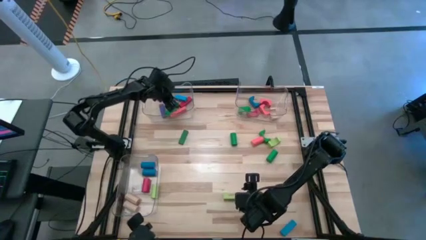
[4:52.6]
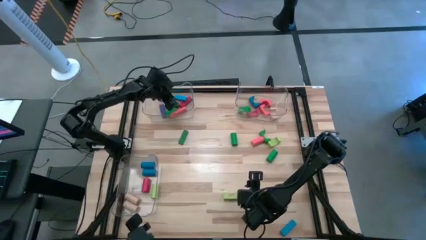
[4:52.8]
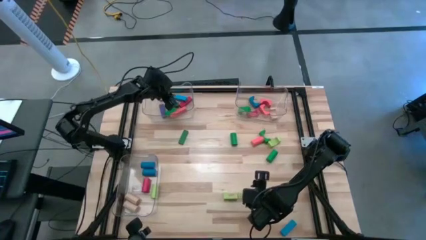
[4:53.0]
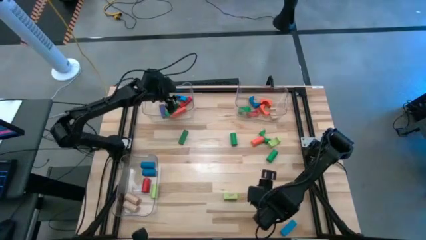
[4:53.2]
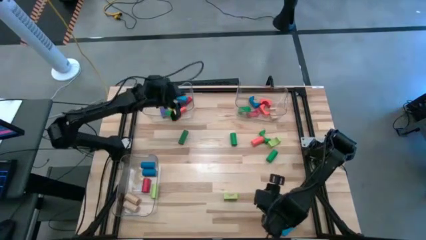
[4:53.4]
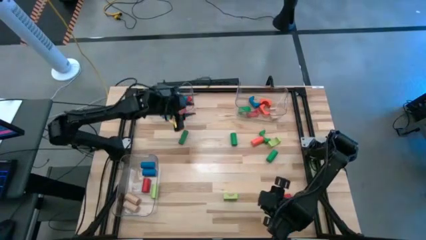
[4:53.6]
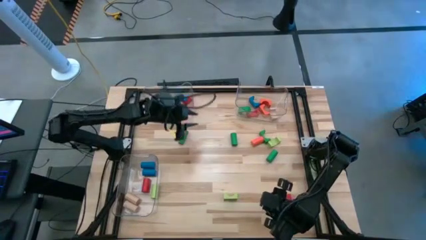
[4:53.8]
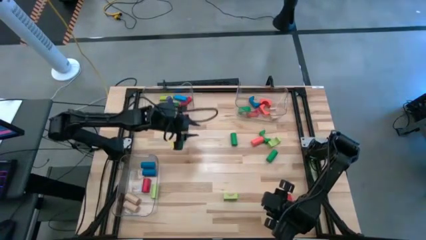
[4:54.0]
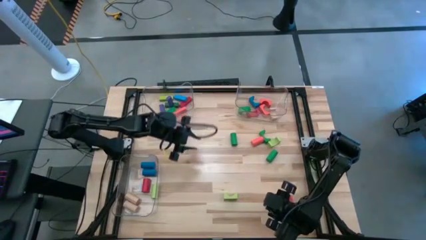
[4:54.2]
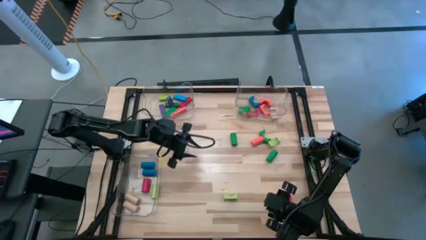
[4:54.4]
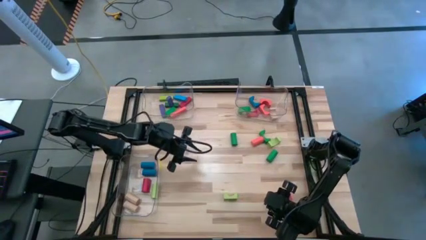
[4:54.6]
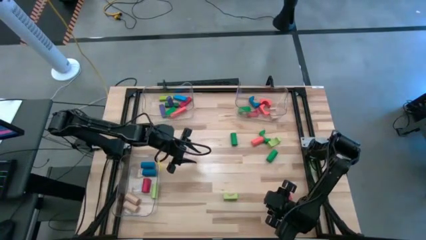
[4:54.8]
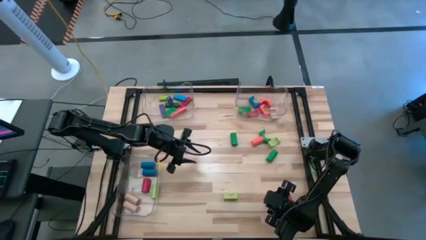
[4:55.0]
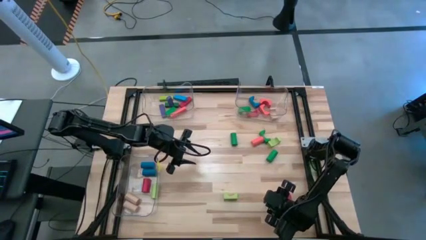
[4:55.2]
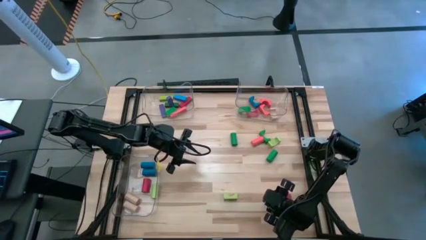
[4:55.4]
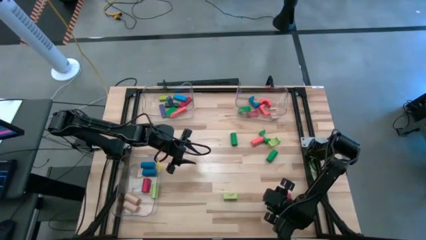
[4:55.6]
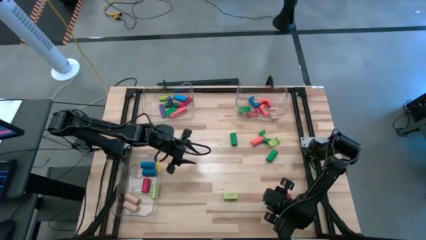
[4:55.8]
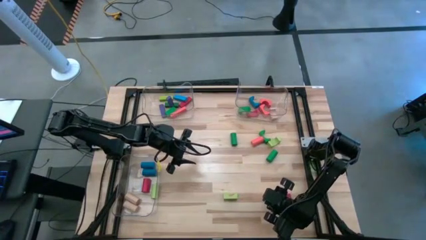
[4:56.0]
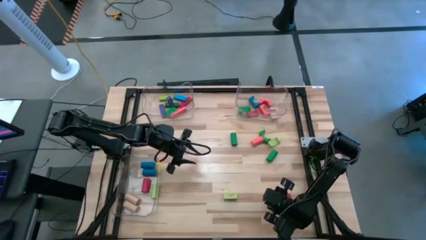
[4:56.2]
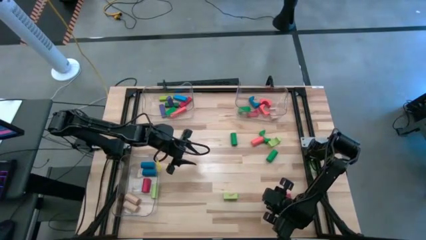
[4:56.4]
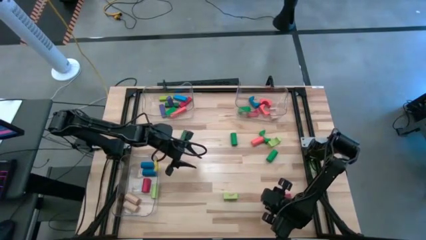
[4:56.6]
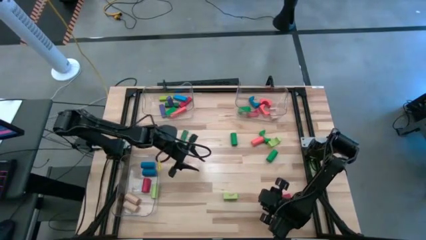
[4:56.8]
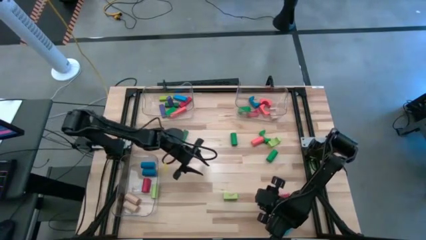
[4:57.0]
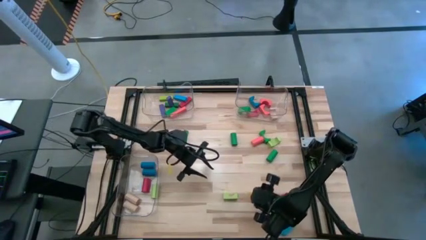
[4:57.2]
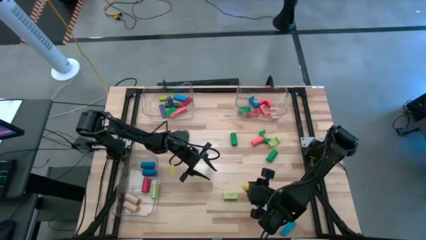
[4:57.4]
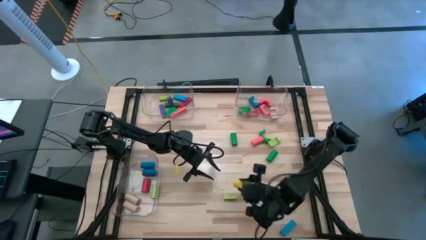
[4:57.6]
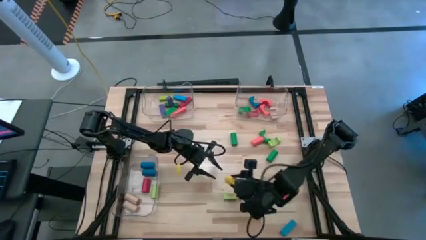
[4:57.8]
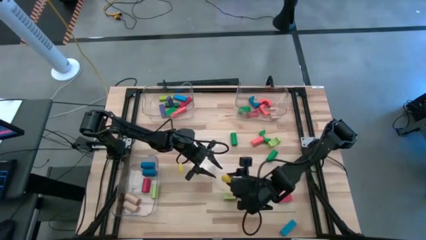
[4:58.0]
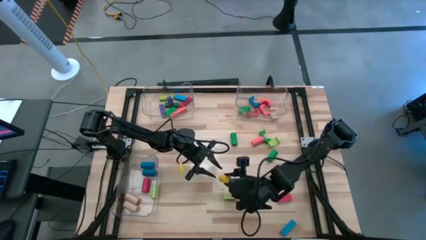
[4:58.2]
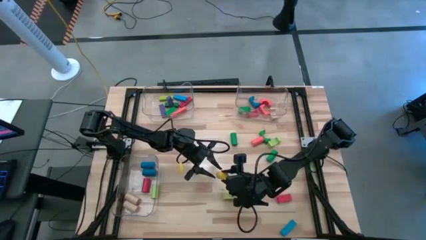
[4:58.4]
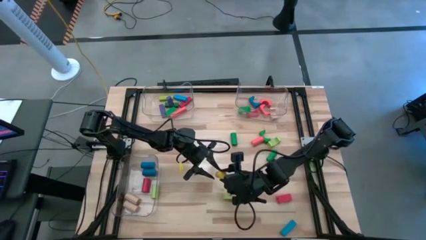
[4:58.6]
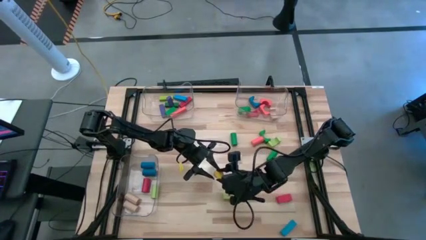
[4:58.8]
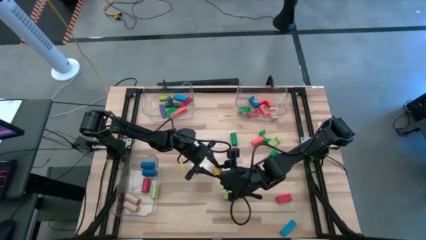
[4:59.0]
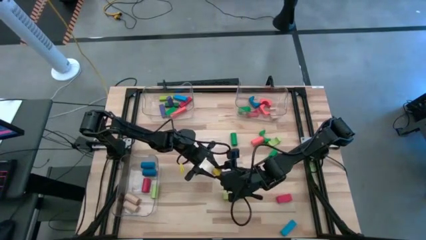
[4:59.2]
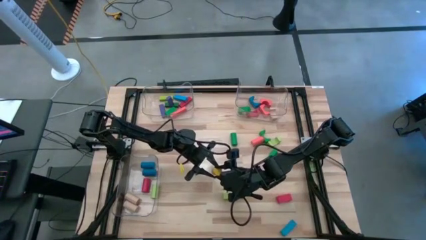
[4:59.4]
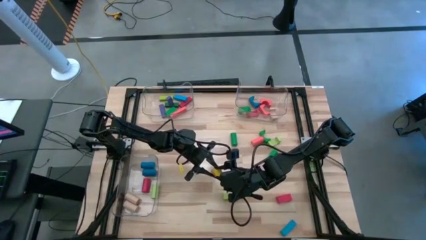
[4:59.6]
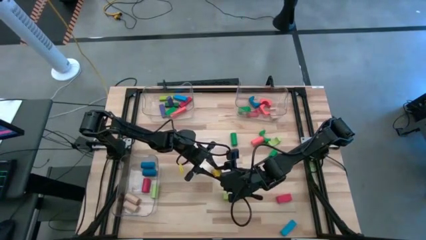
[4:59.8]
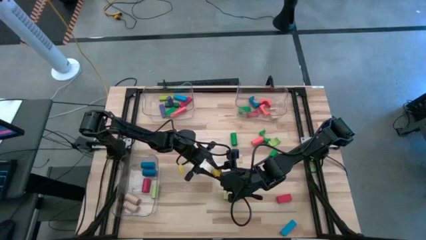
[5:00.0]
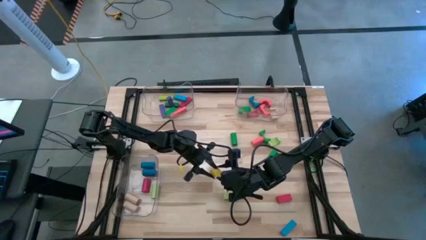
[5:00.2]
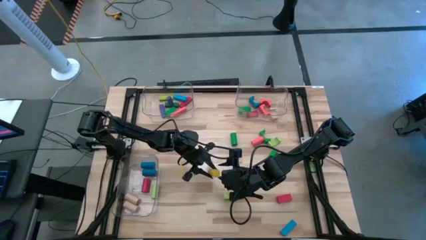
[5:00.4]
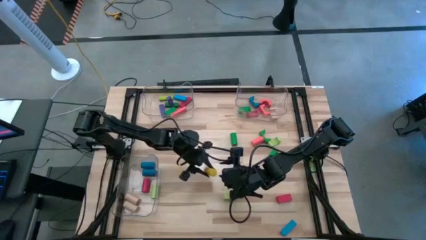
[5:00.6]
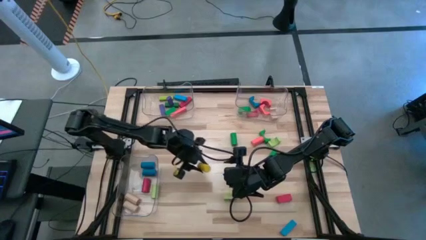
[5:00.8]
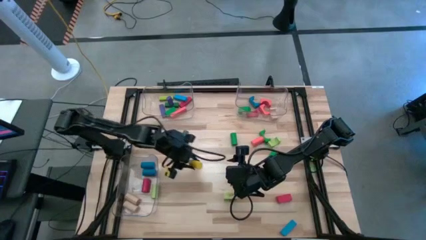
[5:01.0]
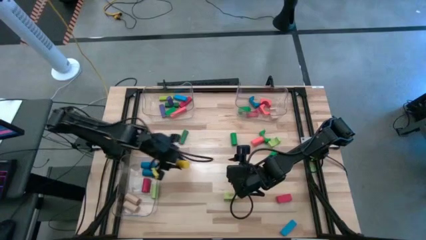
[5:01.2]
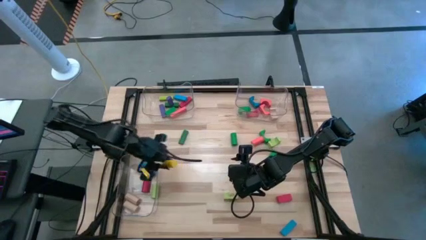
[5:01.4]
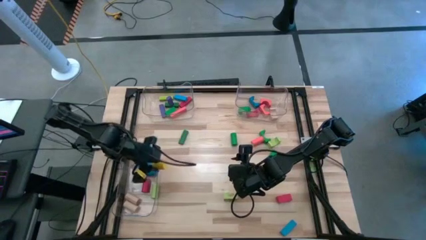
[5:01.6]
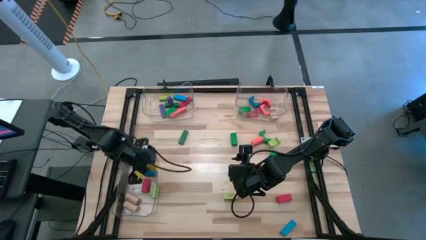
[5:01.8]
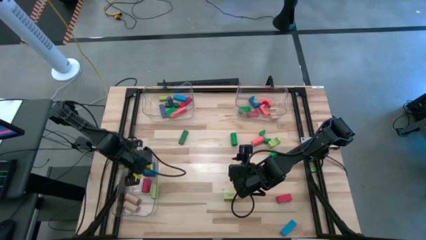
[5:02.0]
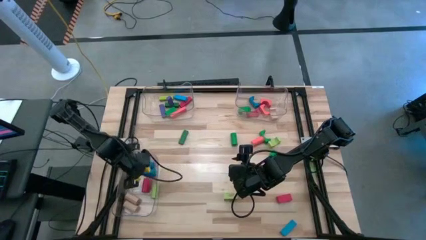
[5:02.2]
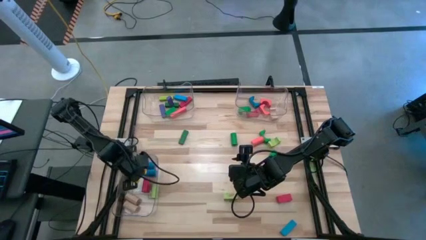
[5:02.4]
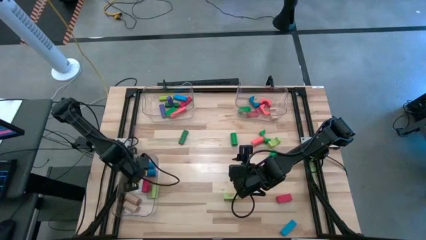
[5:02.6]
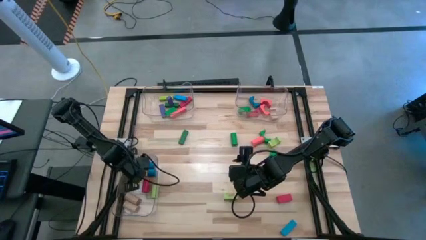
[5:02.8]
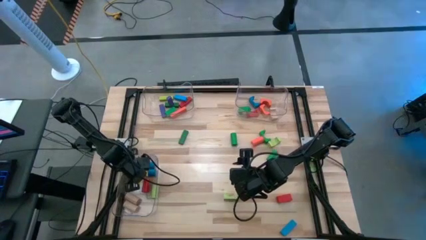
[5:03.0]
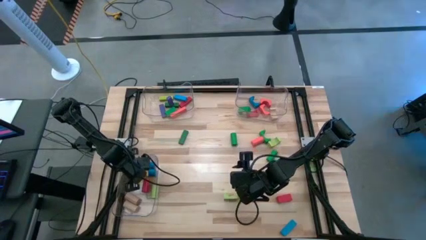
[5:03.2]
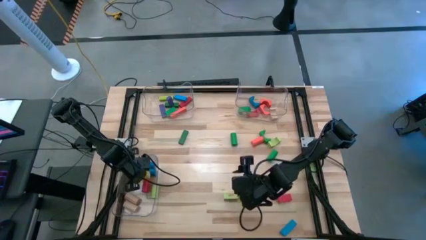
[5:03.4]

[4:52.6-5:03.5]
Task: Sort blocks by size
Put the yellow cylindrical block into the bottom left transparent bin

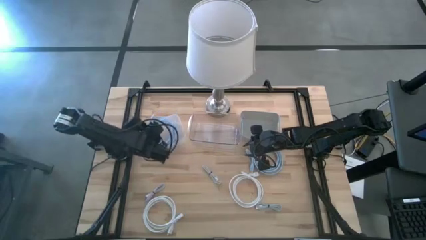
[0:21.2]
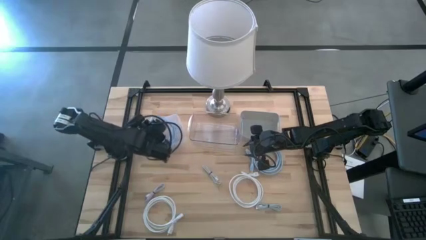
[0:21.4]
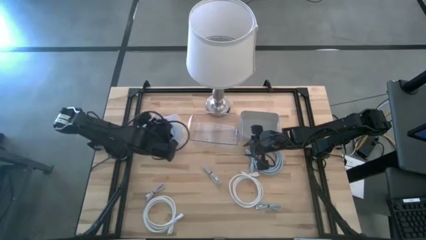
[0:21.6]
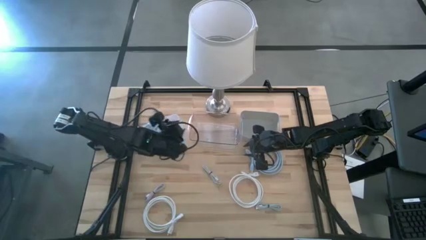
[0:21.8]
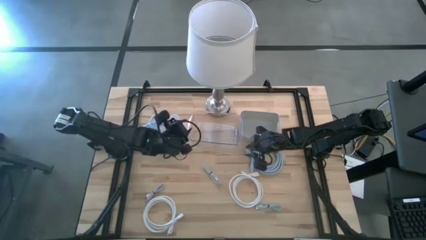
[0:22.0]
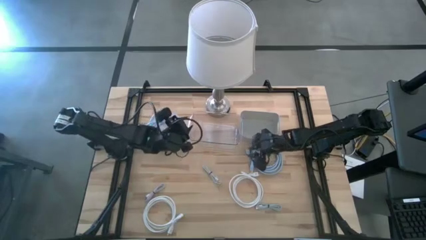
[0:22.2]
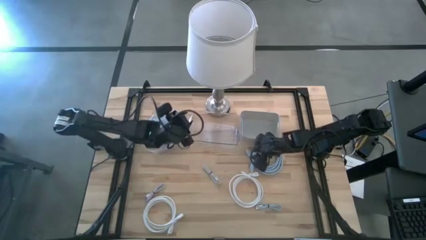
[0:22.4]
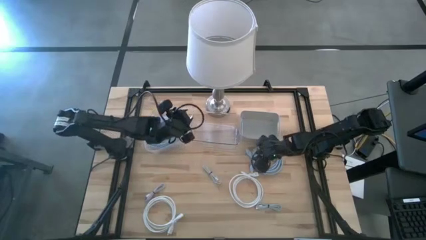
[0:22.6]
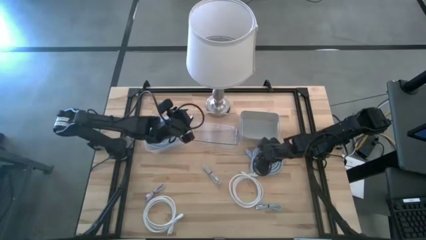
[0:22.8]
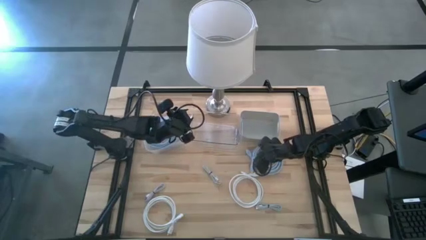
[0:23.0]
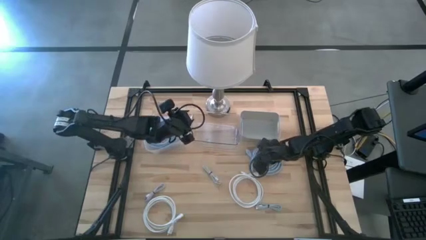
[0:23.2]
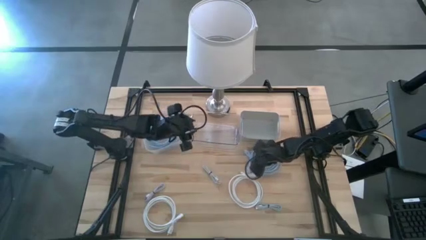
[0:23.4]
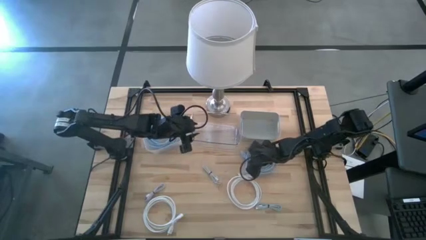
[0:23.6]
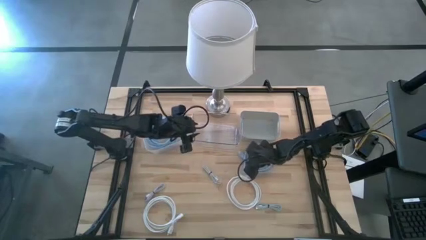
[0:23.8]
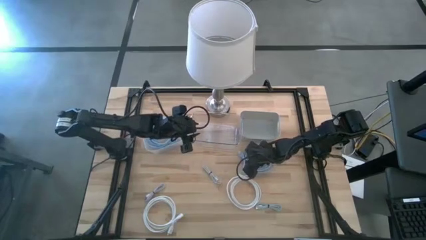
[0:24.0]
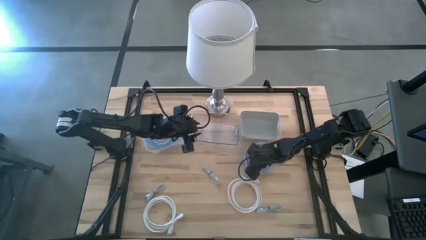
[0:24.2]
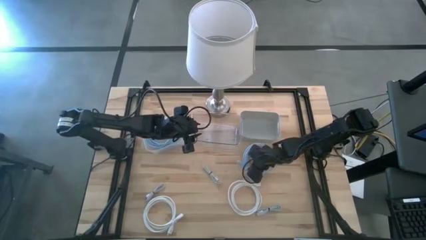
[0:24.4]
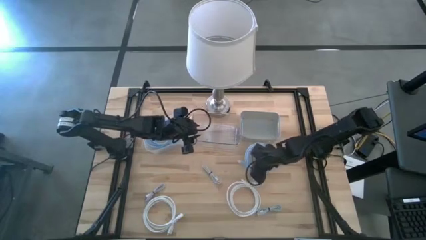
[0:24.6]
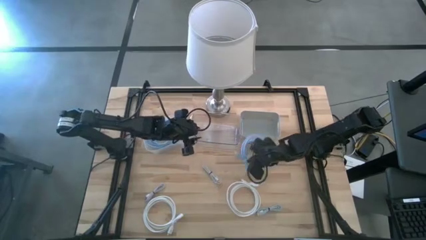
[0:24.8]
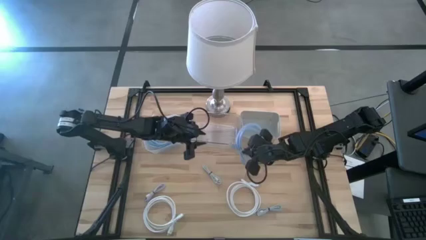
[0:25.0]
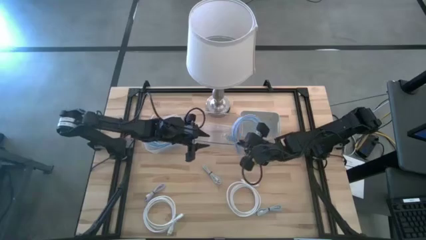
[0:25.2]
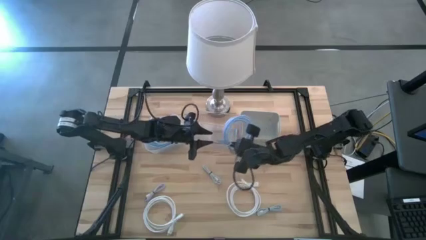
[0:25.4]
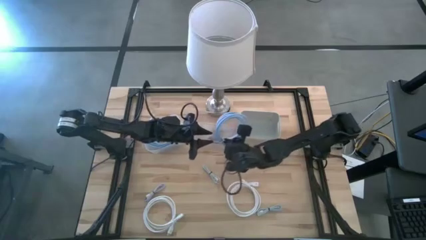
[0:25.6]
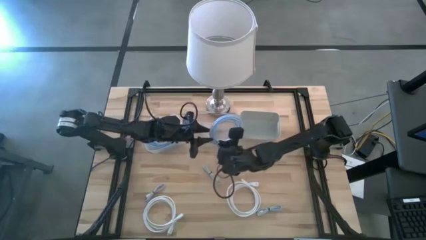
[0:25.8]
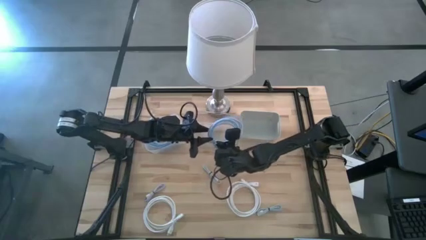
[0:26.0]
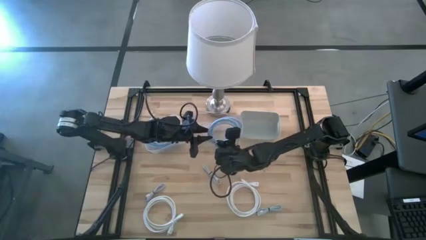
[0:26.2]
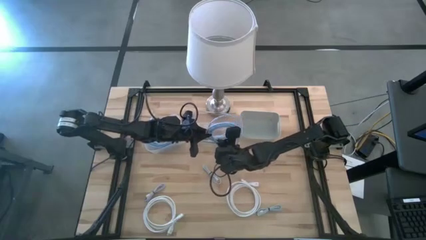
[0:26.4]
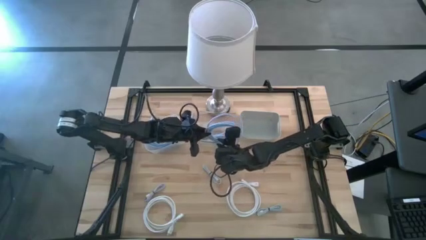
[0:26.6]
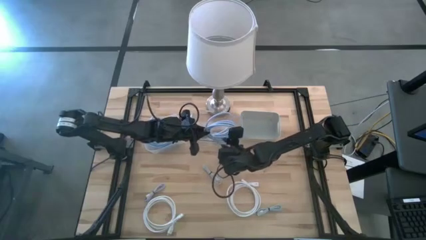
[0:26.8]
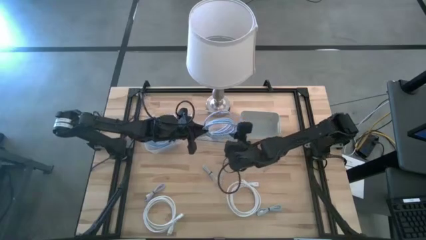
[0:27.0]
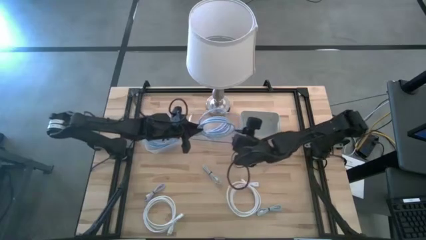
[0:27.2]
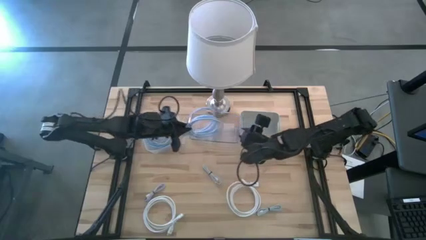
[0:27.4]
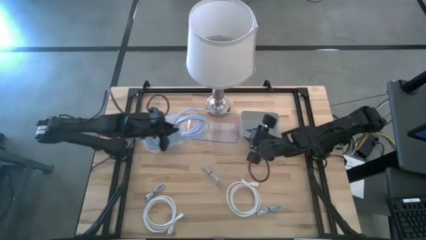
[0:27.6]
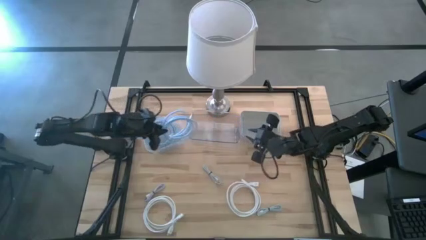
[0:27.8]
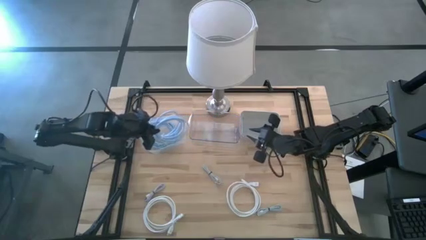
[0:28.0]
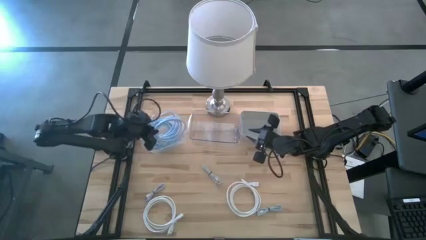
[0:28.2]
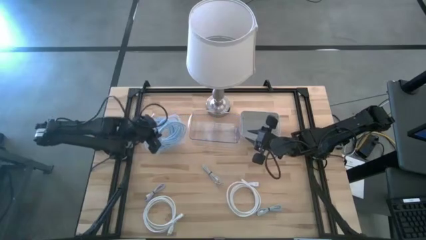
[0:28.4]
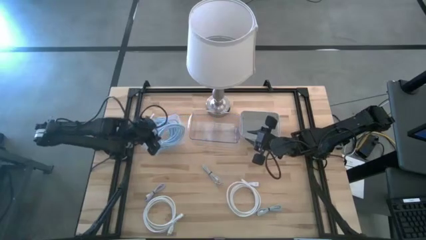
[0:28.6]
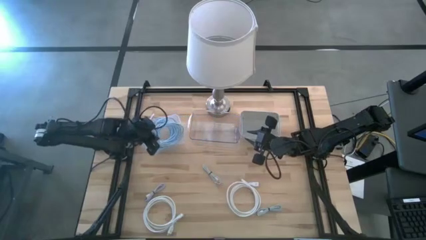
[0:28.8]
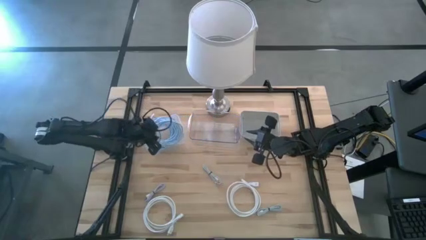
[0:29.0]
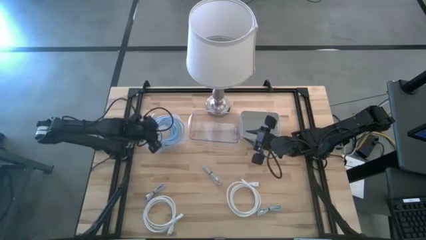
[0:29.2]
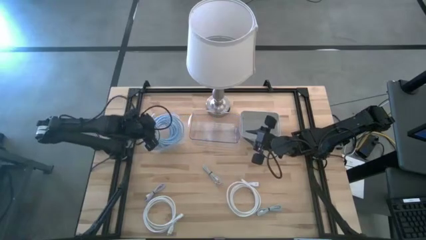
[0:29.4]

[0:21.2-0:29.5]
Task: Pick & Place USB Port
Put the blue hdmi cable into the white bin
